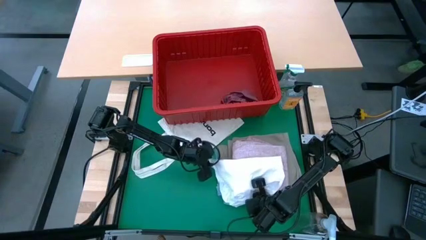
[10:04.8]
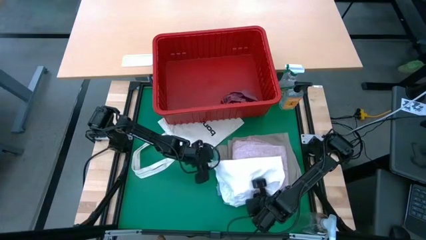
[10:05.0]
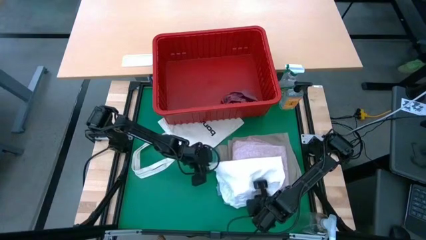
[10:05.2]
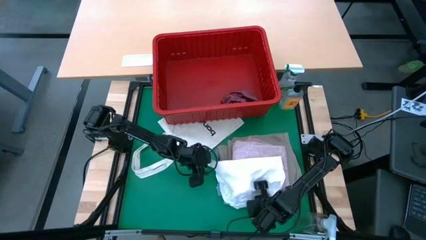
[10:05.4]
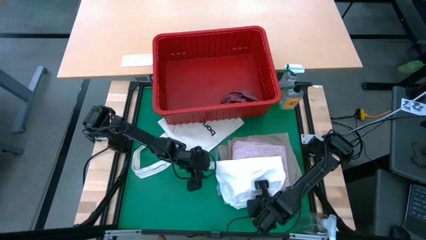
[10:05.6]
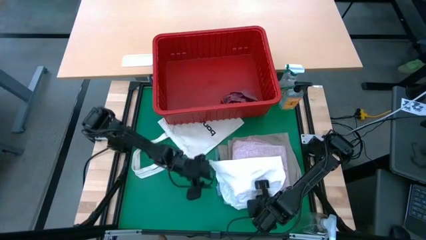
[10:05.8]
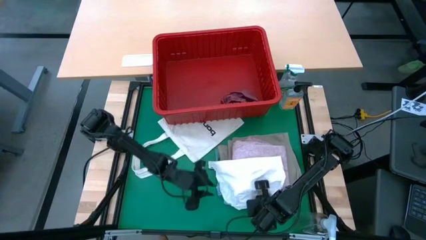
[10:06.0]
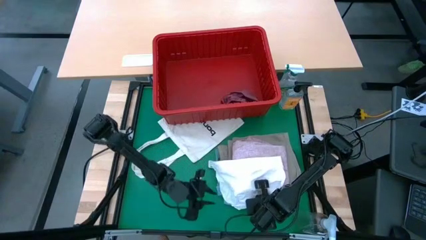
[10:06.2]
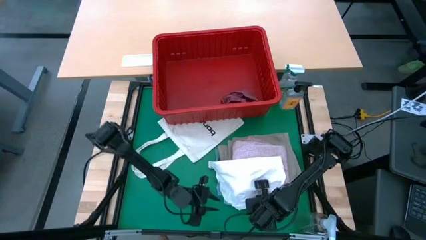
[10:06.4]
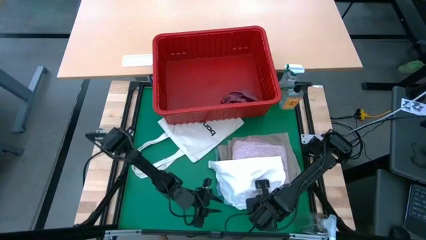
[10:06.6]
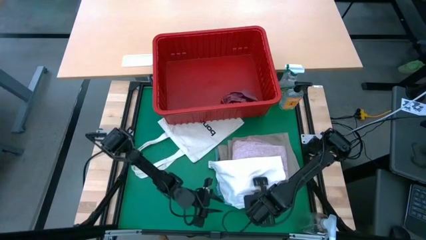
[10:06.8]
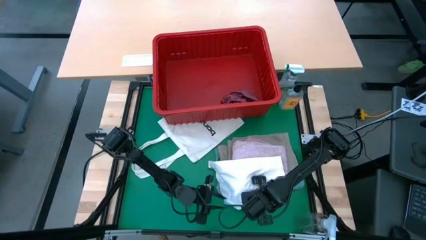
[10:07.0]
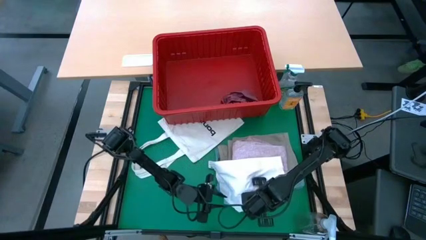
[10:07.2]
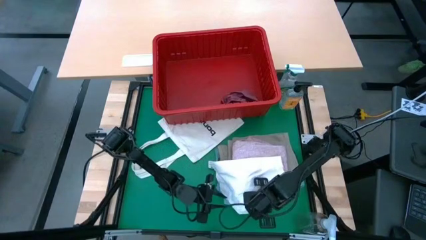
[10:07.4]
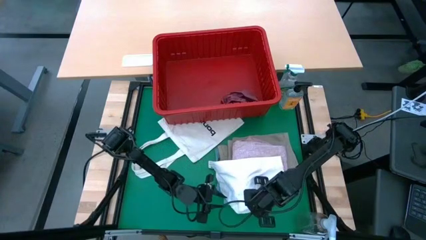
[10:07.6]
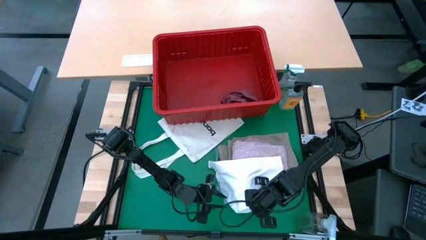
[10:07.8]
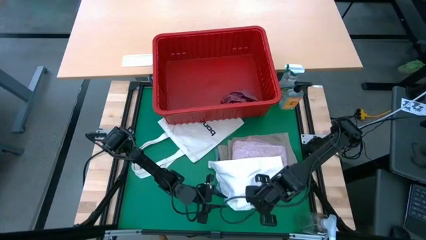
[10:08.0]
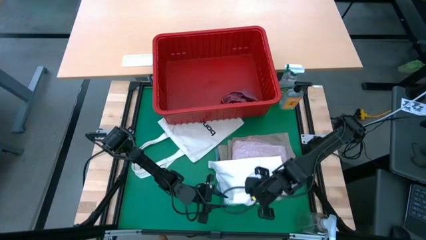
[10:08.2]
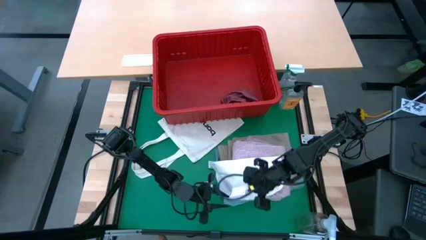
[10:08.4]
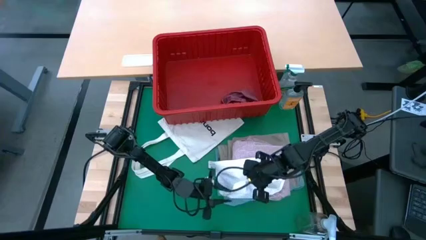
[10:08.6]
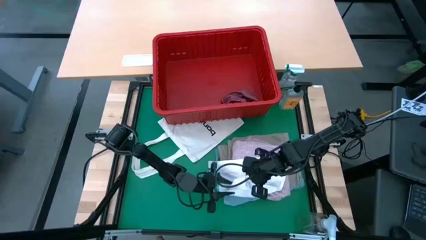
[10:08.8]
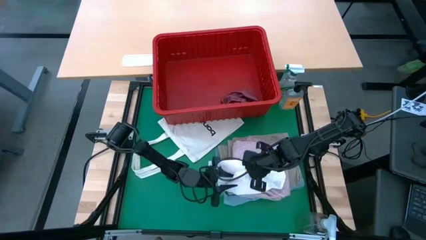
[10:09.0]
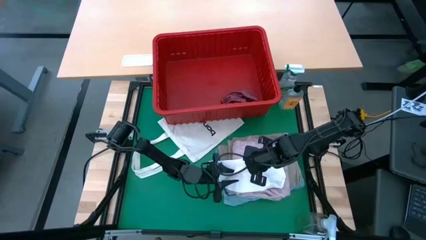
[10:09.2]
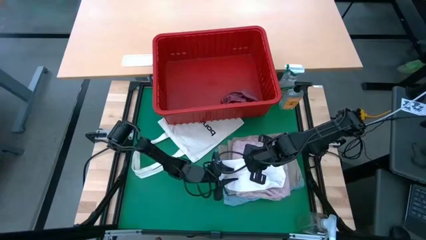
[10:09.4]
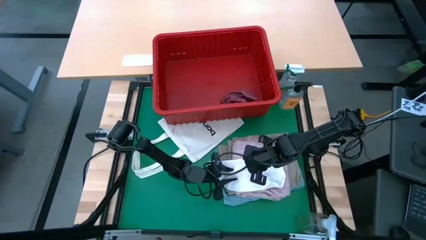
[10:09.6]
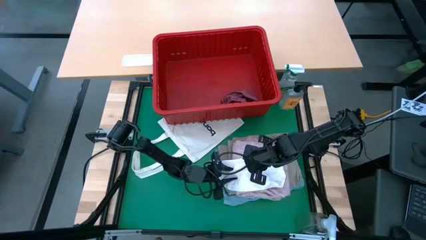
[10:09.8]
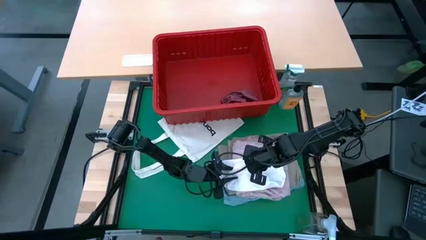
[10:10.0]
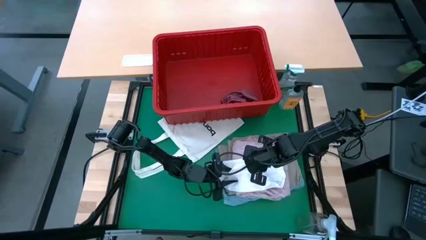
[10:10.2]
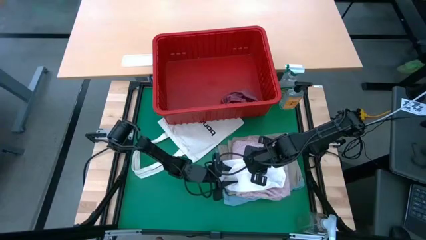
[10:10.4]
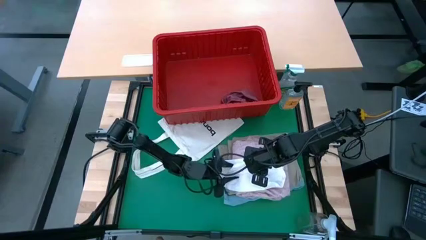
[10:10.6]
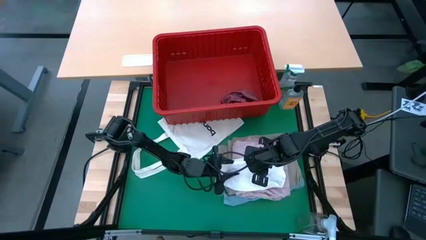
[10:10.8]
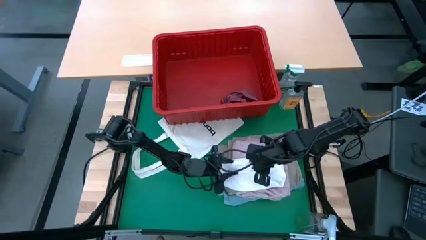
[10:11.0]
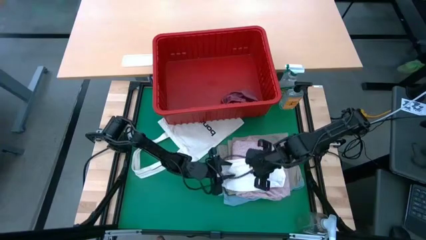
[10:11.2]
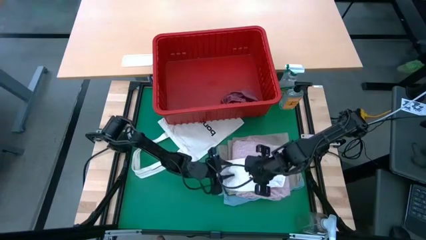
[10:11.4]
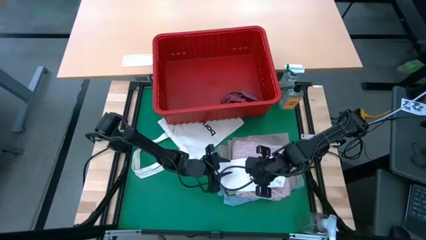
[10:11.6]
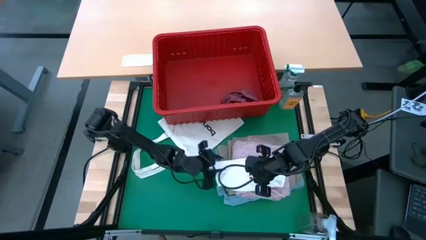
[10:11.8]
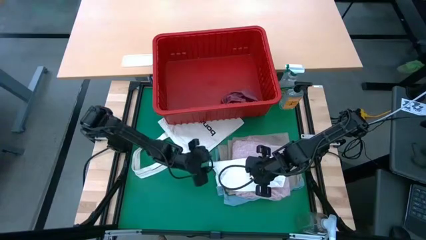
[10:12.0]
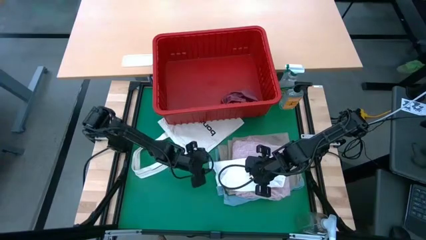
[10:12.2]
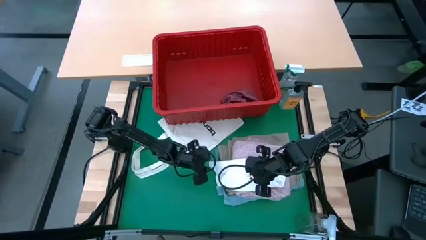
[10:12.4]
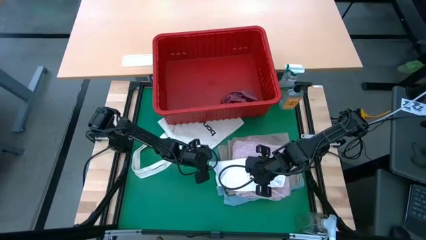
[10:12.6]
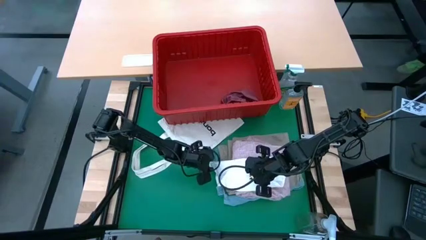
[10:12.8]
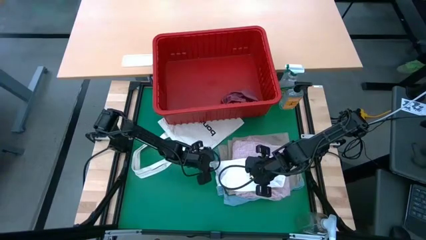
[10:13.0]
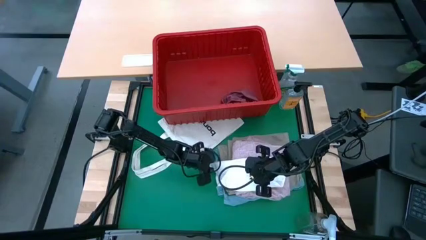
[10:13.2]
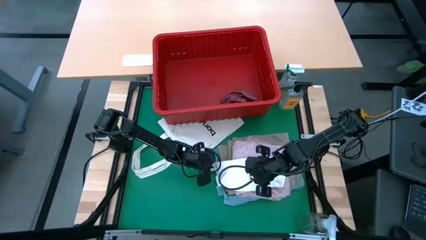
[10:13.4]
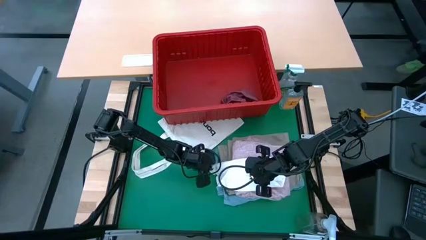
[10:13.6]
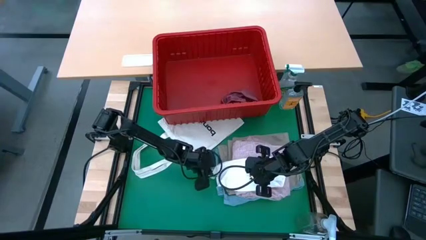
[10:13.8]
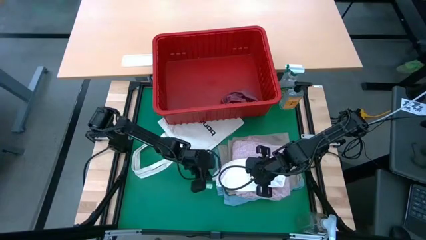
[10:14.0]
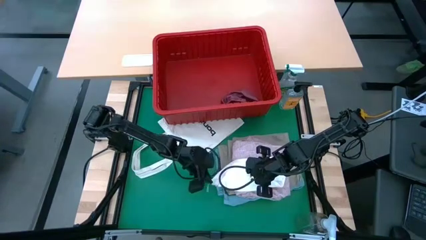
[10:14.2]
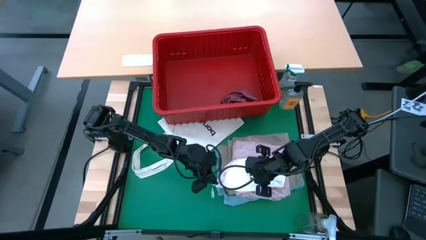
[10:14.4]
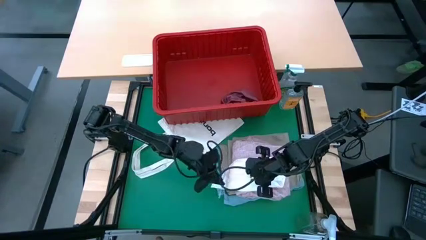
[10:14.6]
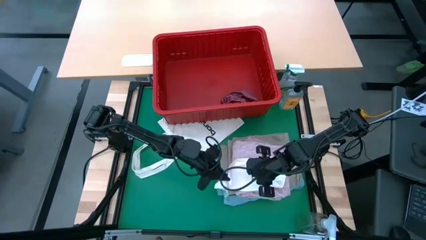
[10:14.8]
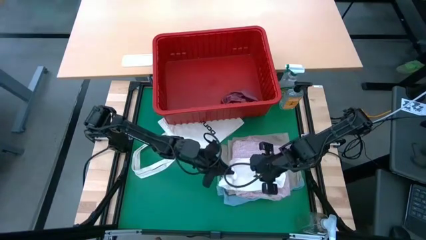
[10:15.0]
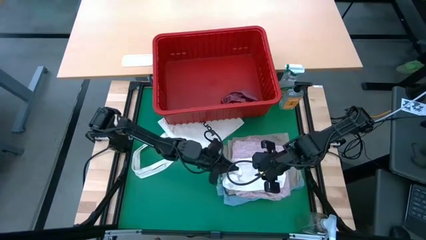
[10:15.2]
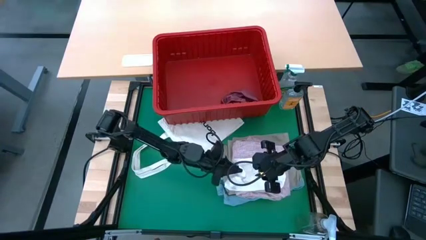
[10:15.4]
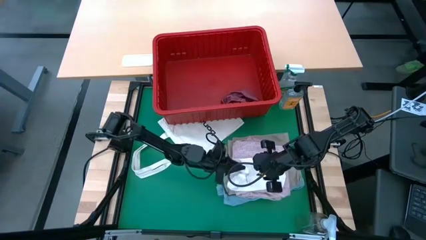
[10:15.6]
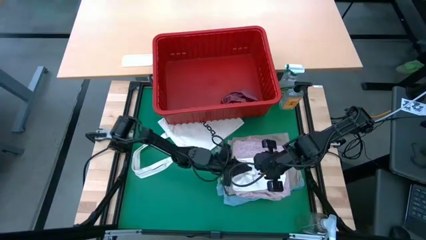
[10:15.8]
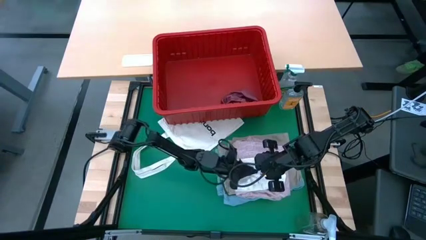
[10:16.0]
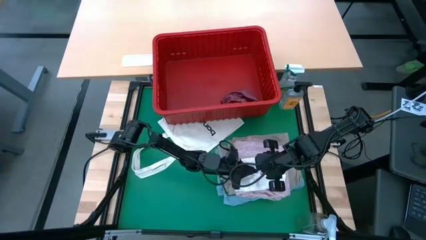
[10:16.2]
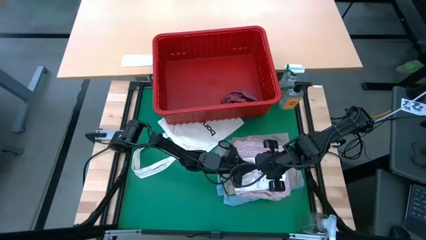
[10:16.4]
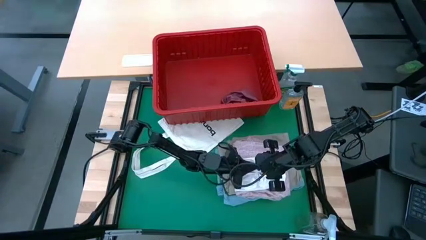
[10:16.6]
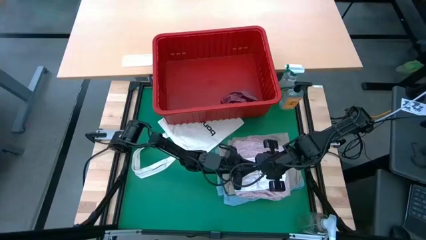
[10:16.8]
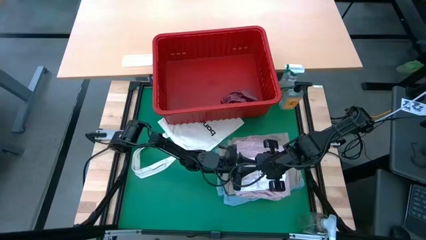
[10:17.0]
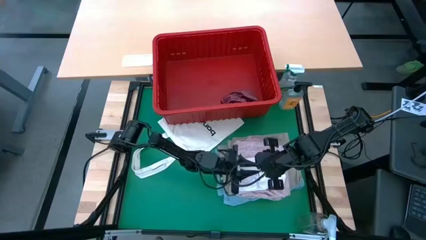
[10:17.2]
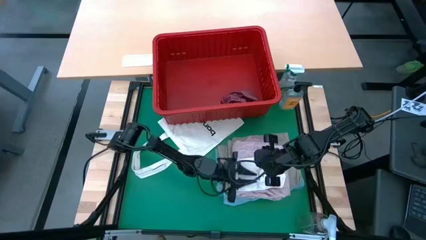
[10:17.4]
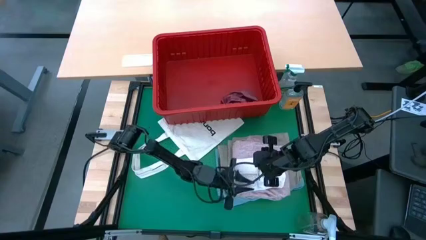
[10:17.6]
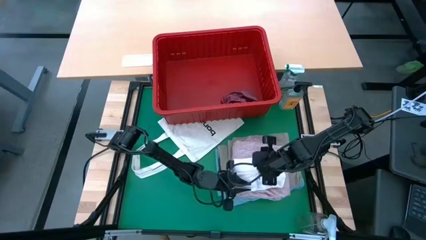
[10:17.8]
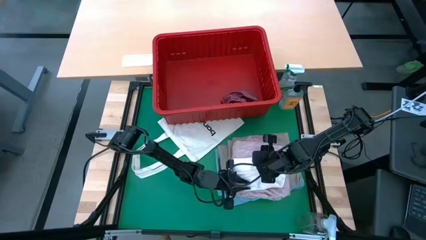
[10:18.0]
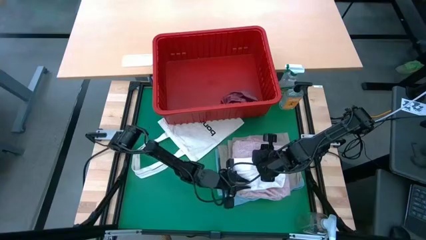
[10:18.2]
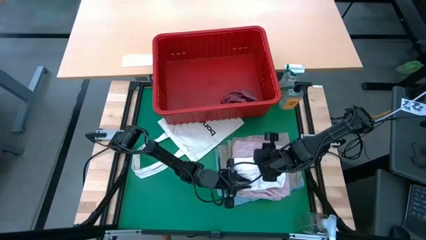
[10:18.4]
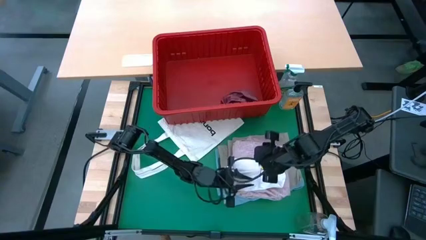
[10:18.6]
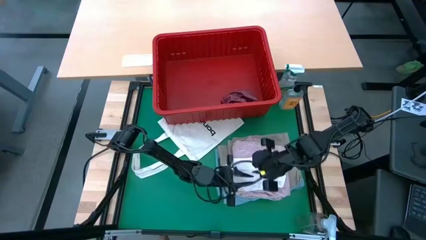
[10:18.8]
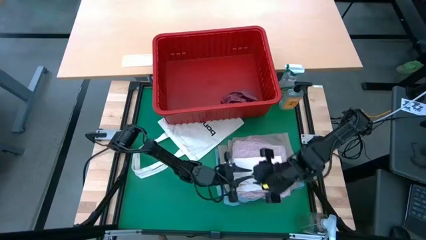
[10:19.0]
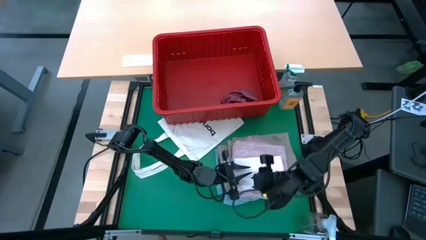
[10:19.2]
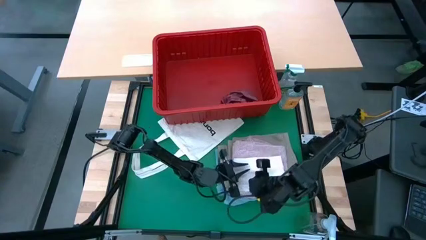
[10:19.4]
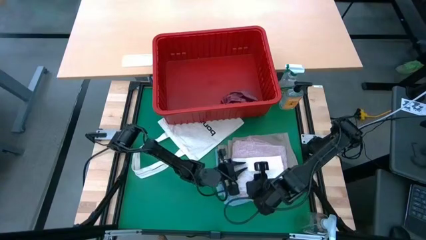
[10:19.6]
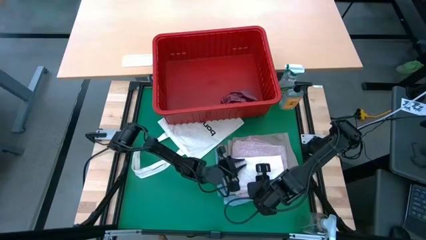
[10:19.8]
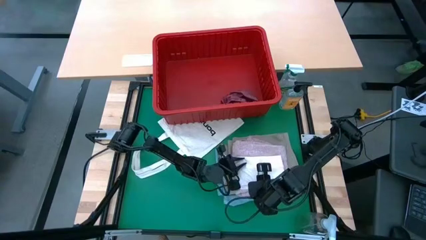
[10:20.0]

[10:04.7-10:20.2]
Task: Fold laundry
Fold the white underwear
